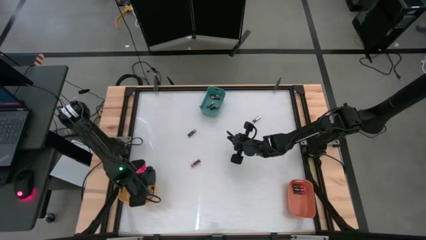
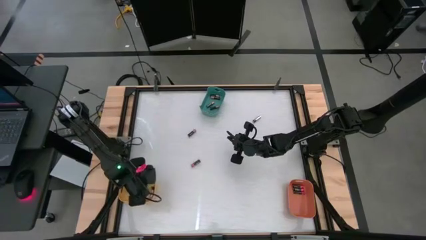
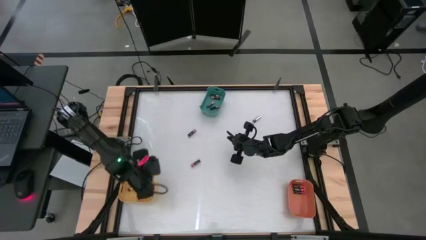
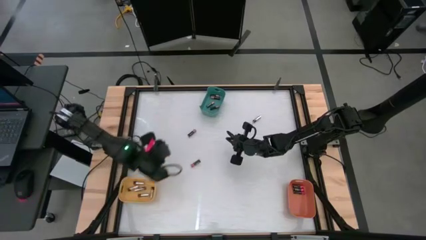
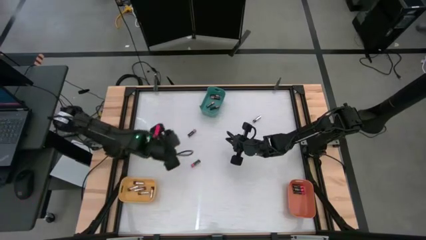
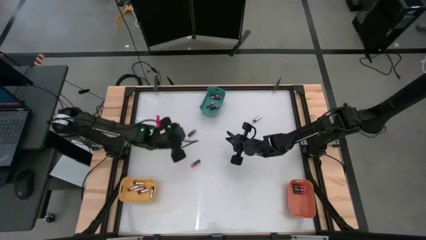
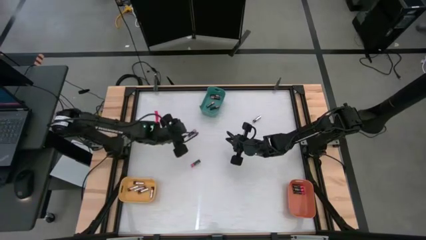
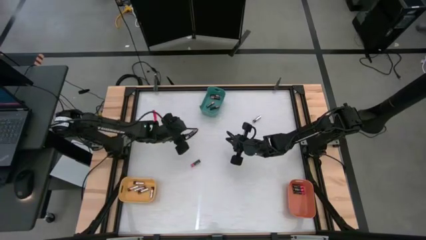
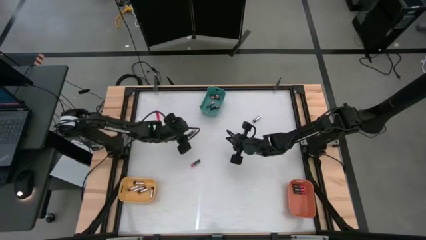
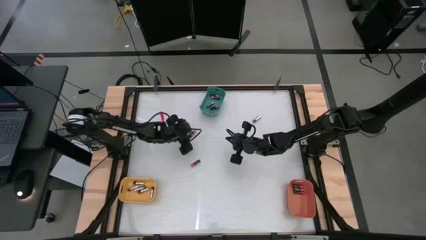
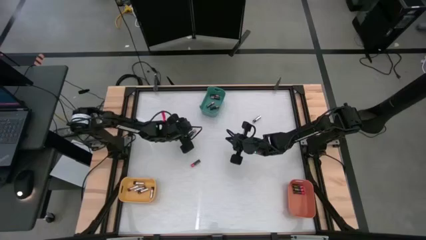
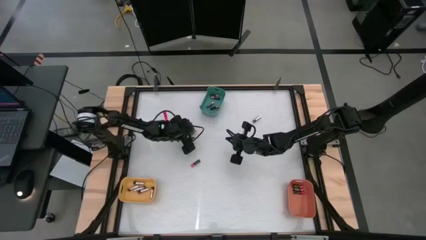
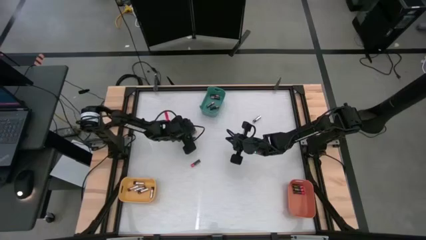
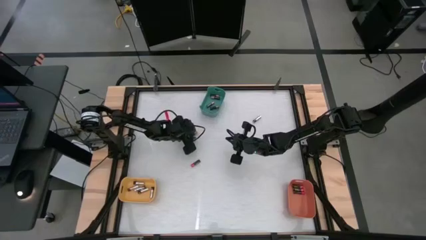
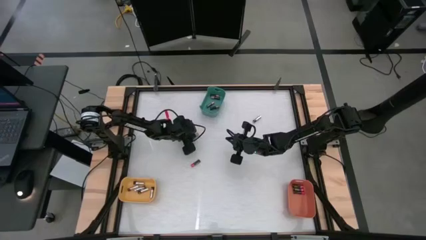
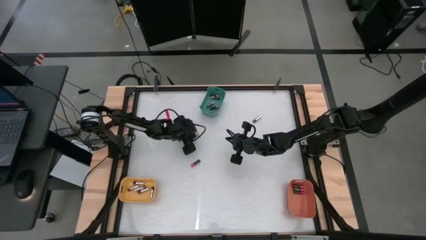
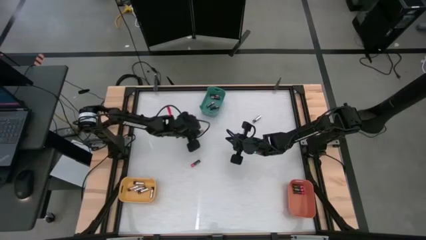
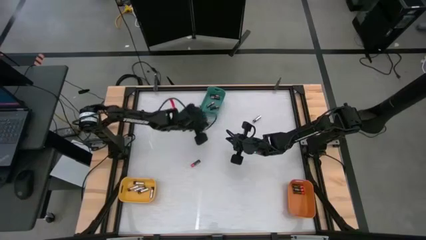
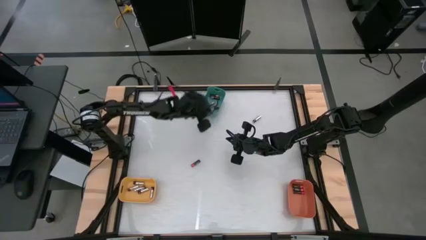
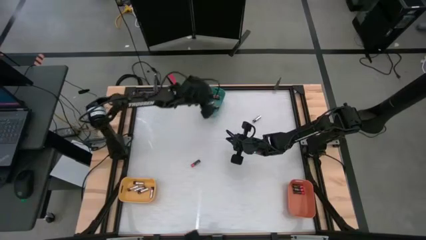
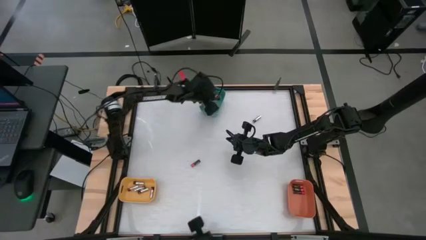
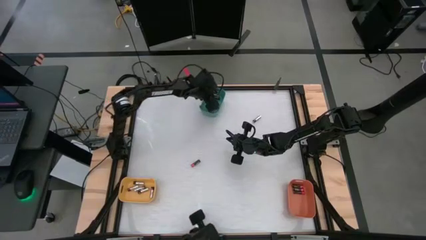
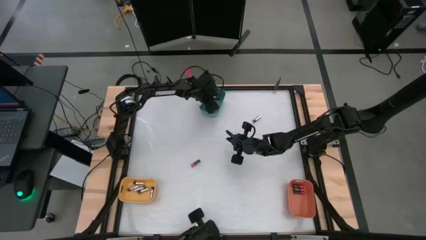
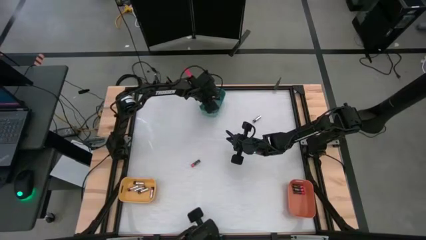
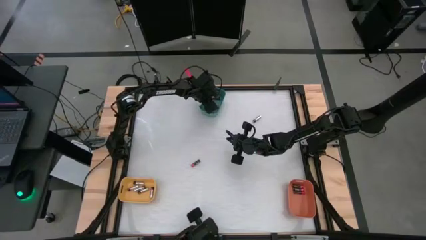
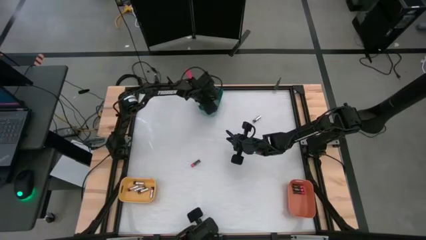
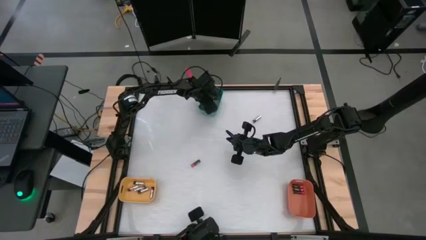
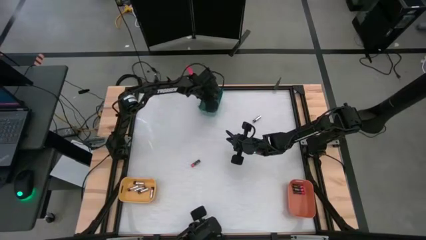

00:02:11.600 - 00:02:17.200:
Task: Sort batteries
Put the brown battery into the green bin

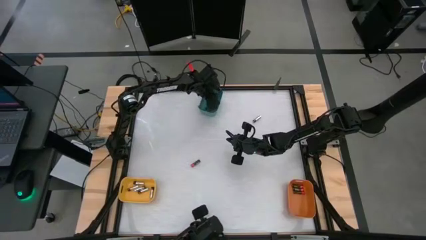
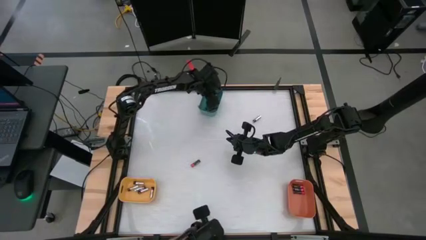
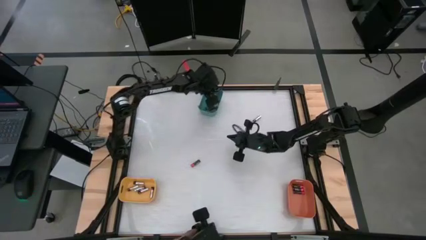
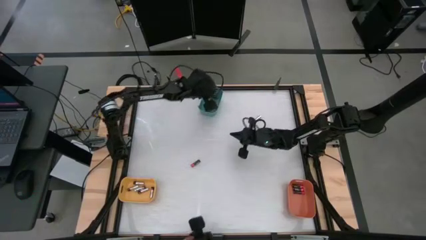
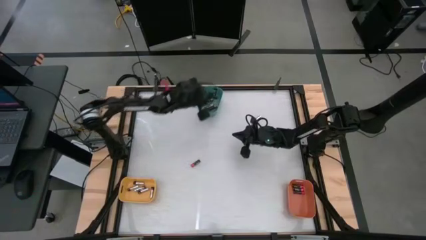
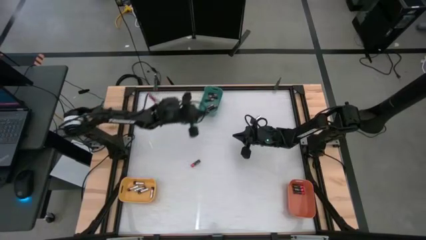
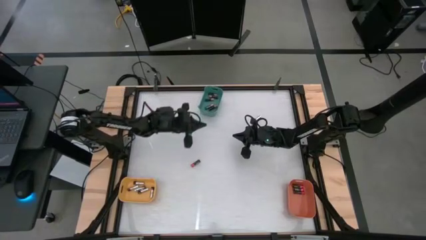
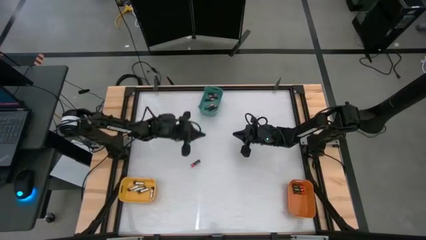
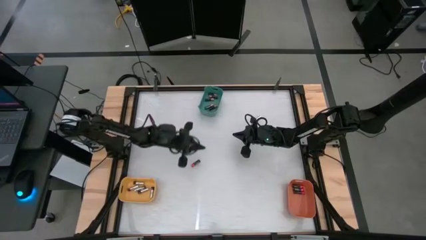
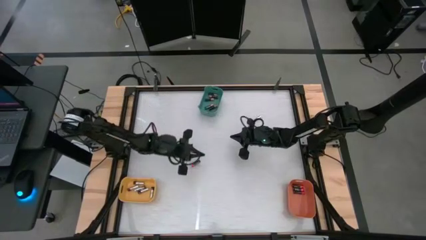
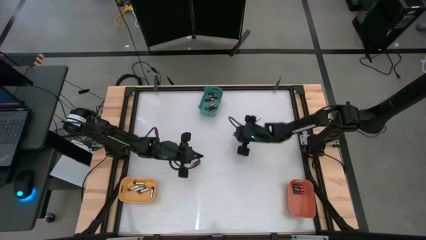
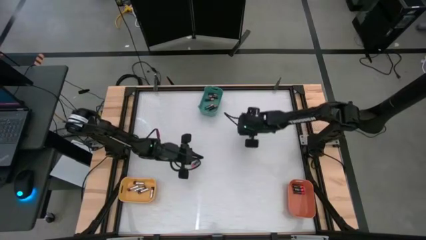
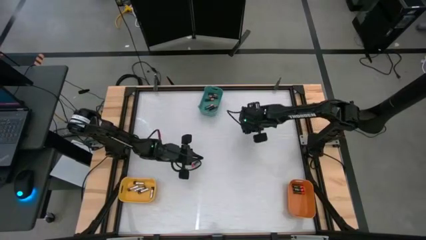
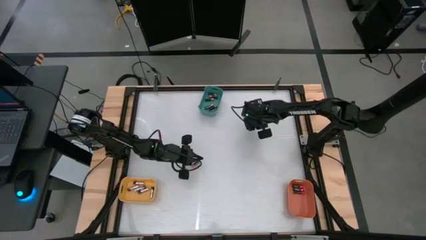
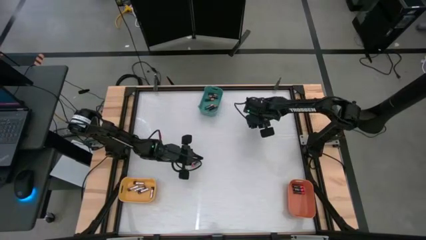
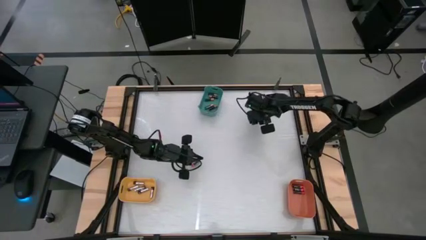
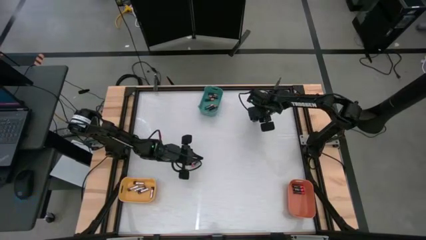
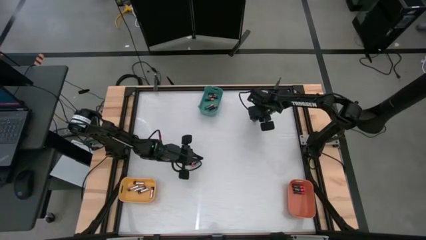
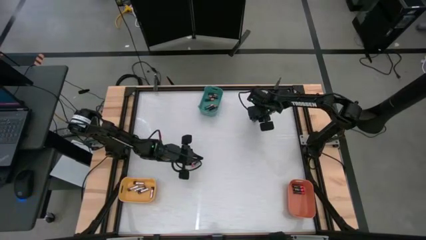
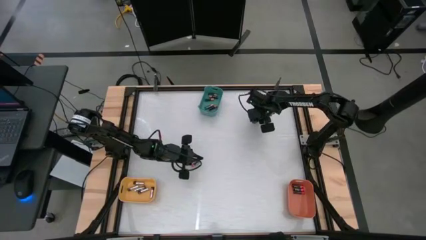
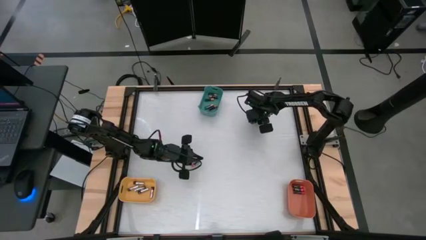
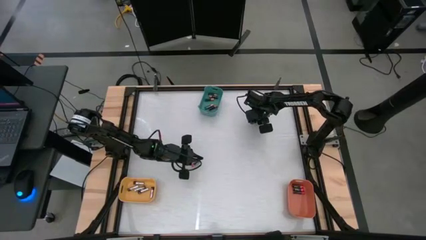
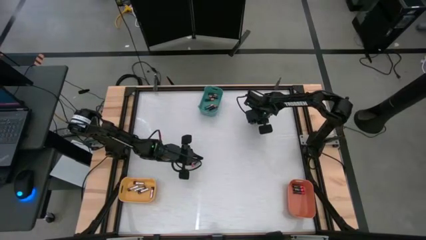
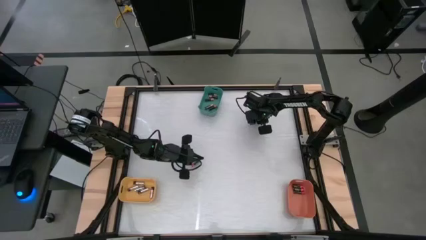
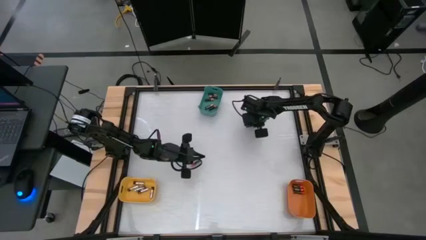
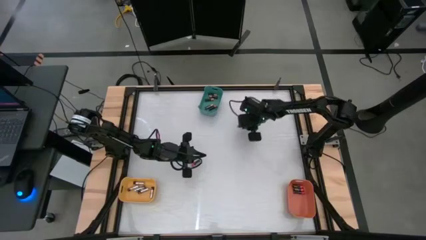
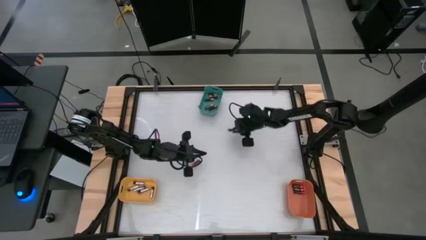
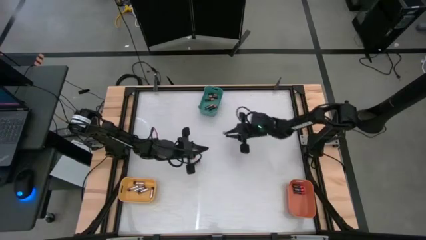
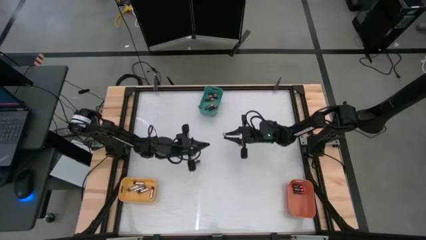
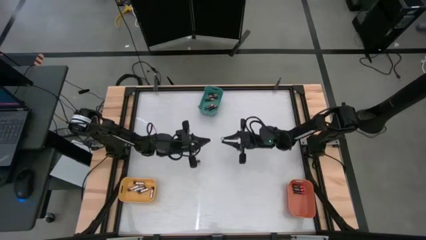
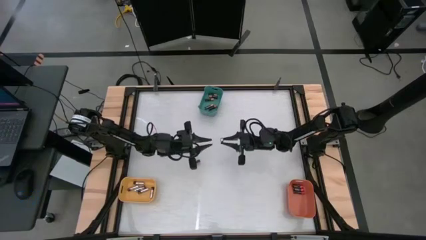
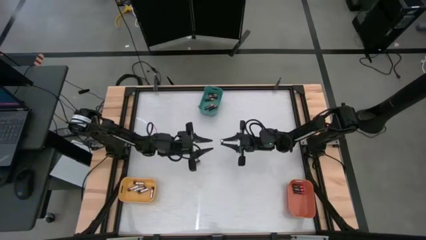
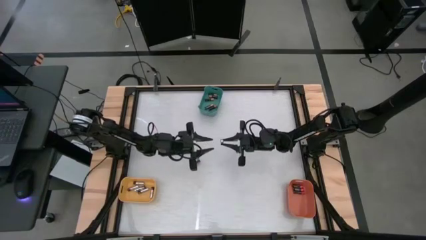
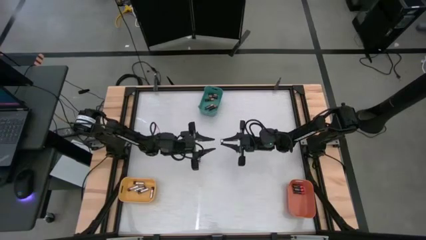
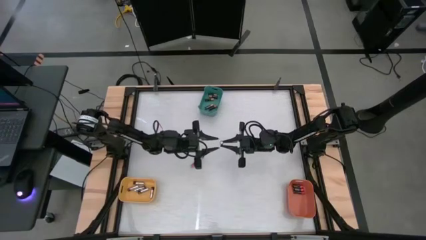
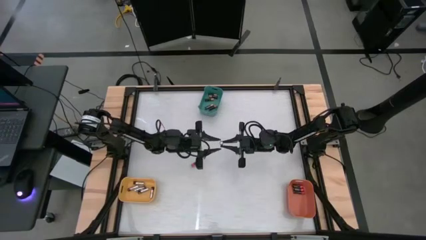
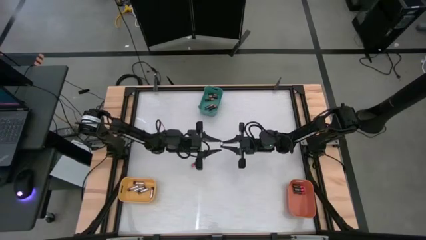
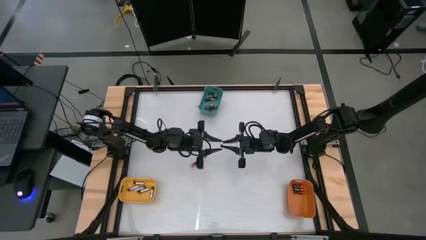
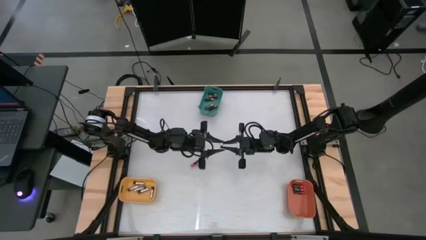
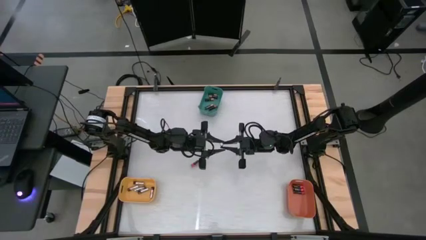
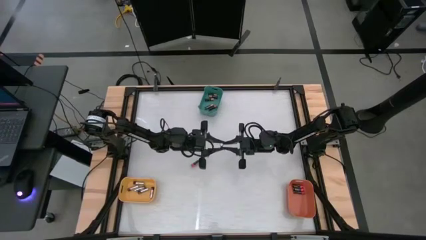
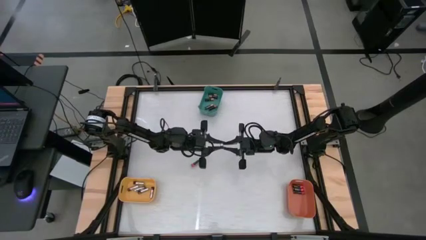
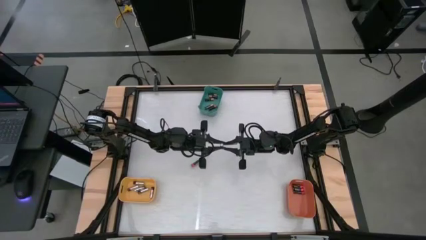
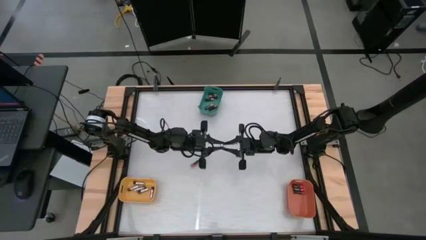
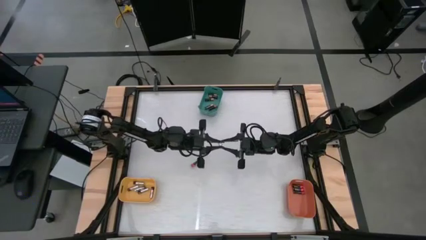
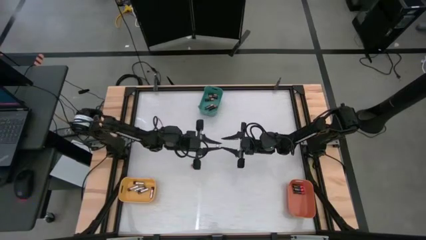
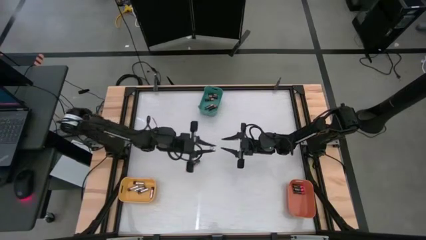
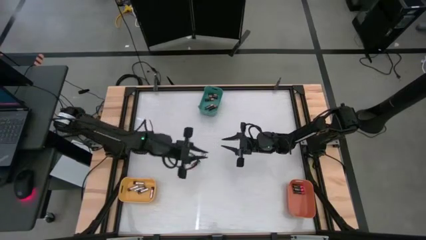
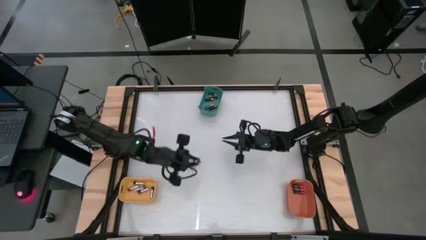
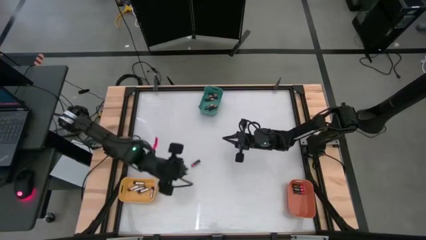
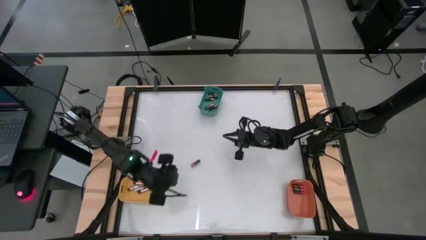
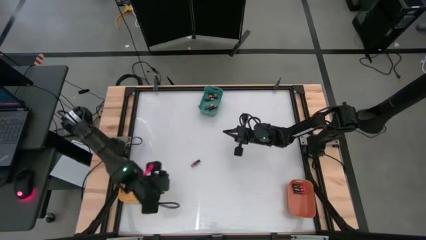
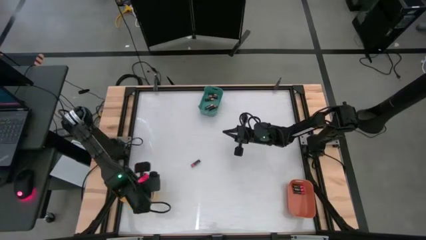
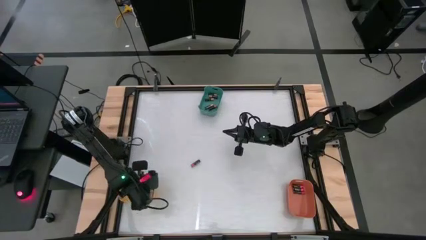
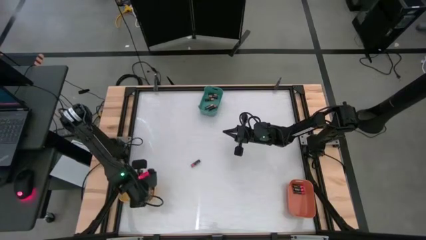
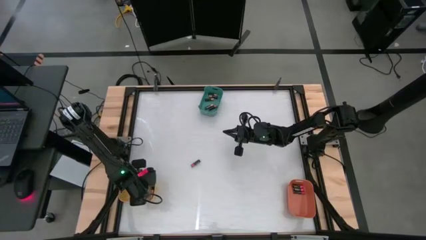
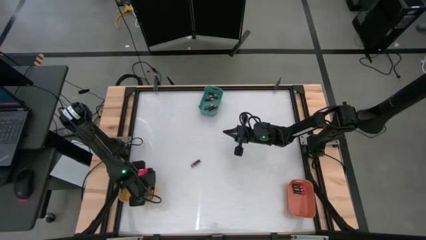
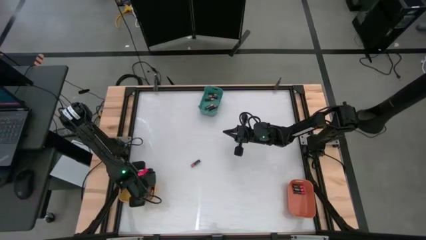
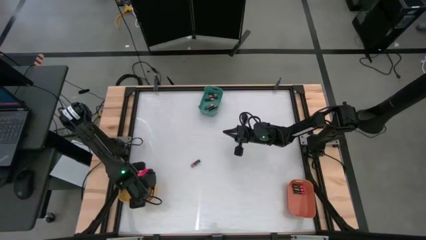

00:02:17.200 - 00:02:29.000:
Put the silver battery into the yellow bin
